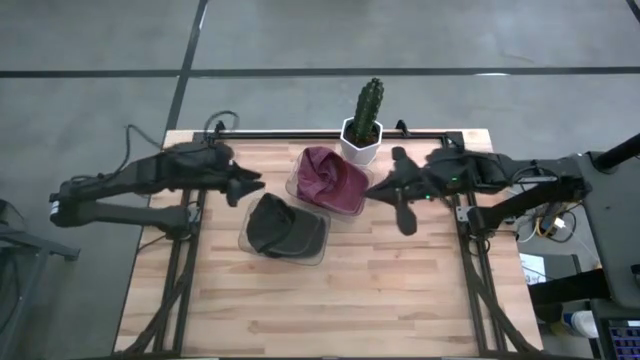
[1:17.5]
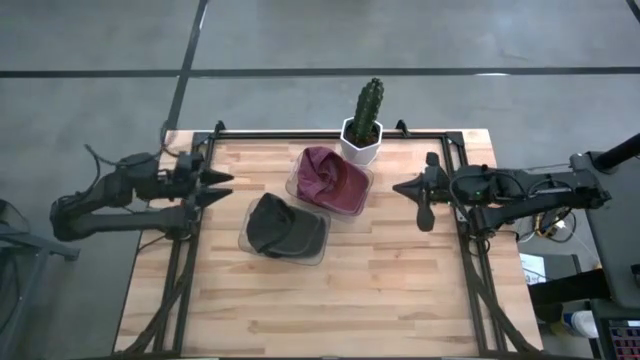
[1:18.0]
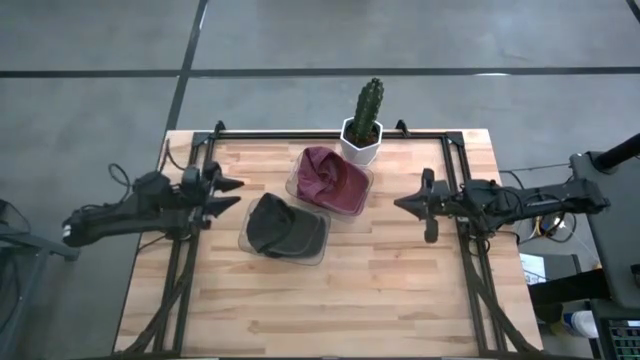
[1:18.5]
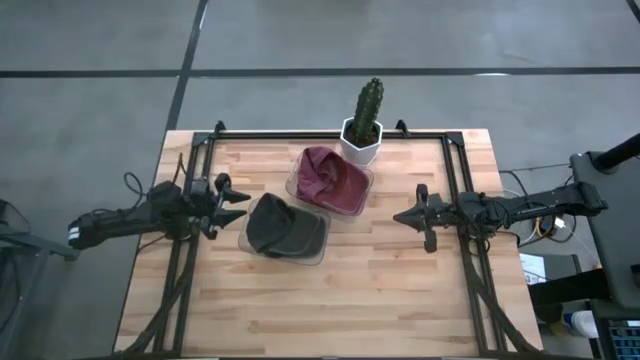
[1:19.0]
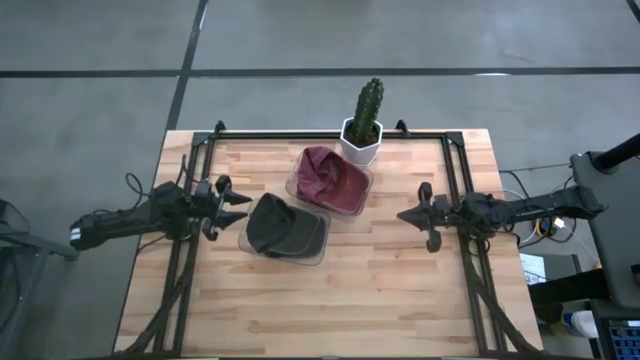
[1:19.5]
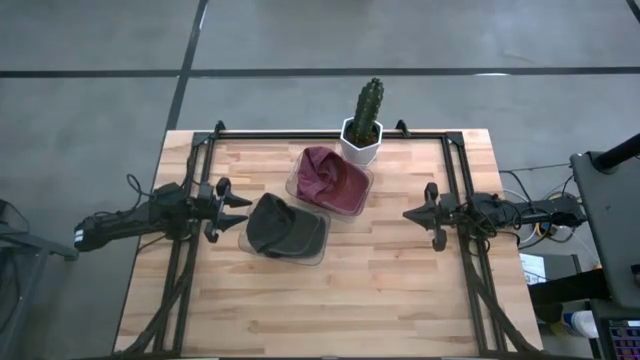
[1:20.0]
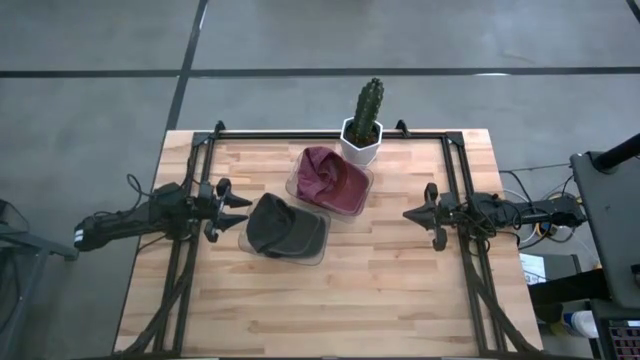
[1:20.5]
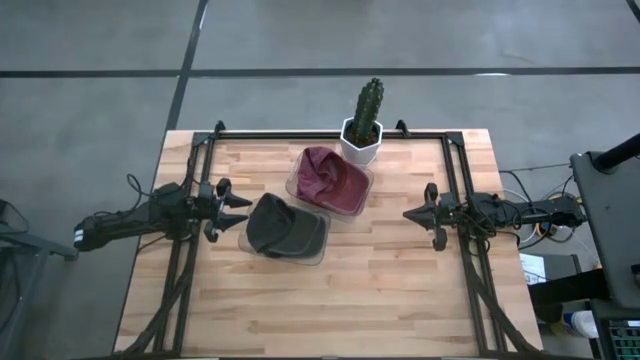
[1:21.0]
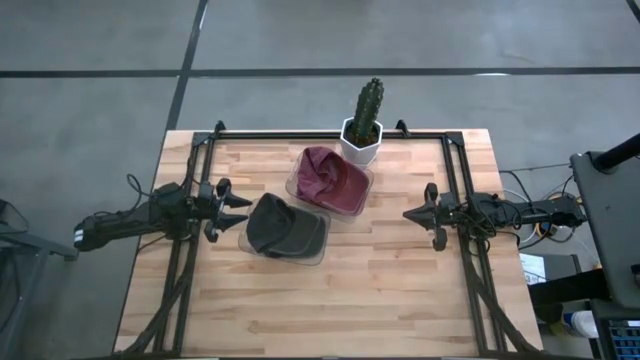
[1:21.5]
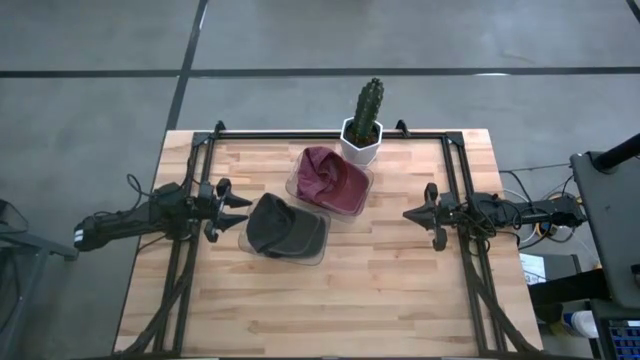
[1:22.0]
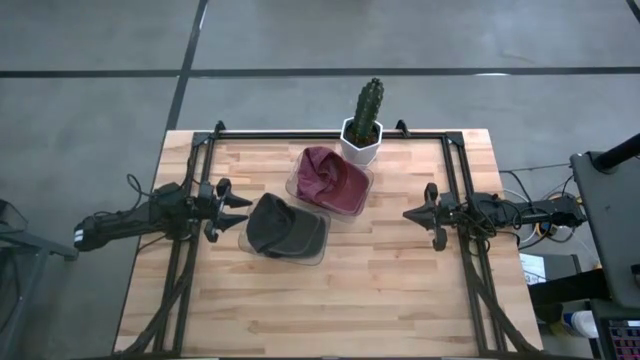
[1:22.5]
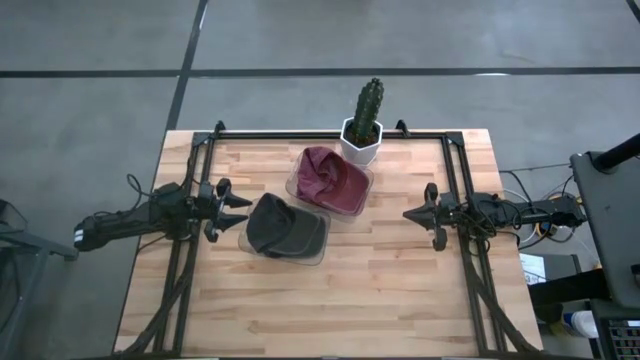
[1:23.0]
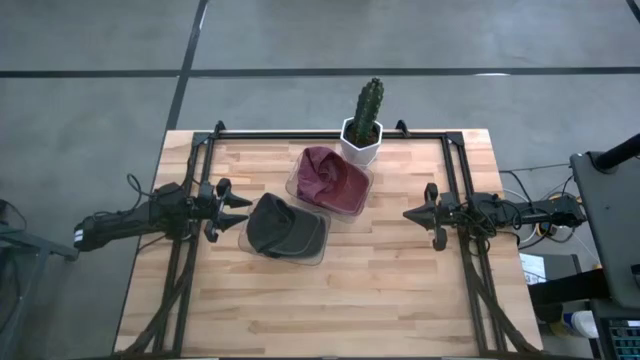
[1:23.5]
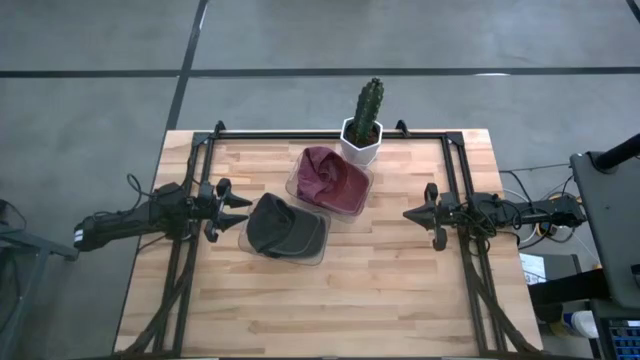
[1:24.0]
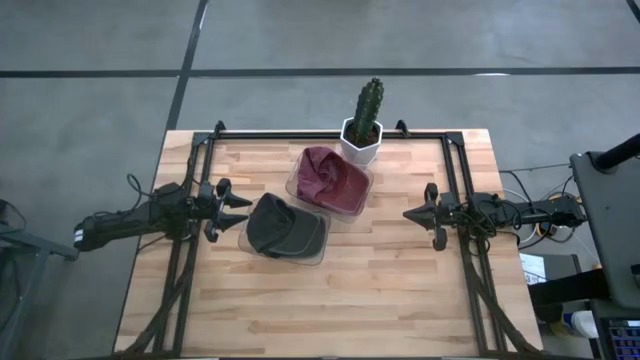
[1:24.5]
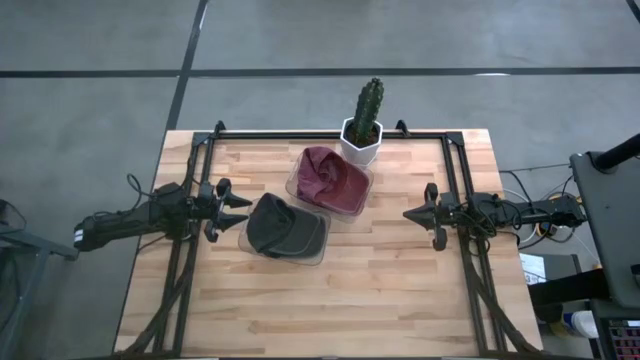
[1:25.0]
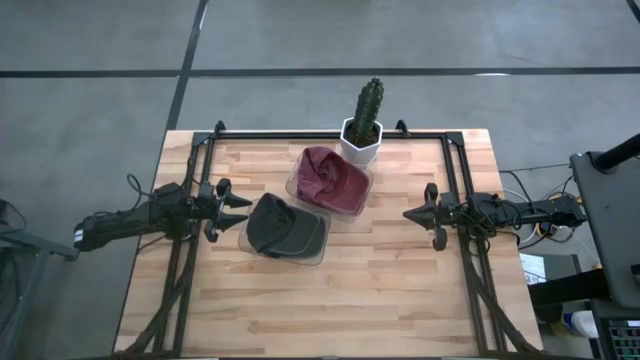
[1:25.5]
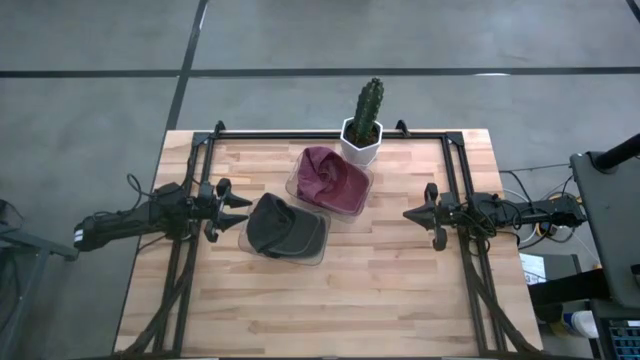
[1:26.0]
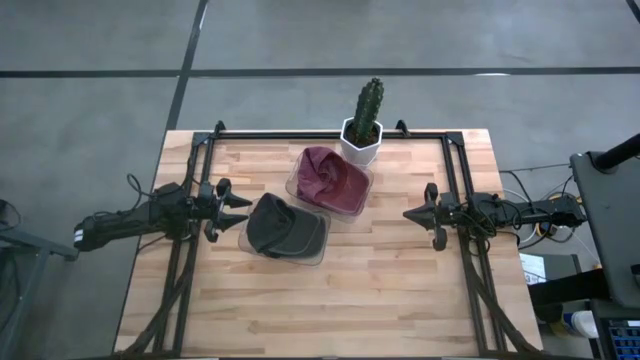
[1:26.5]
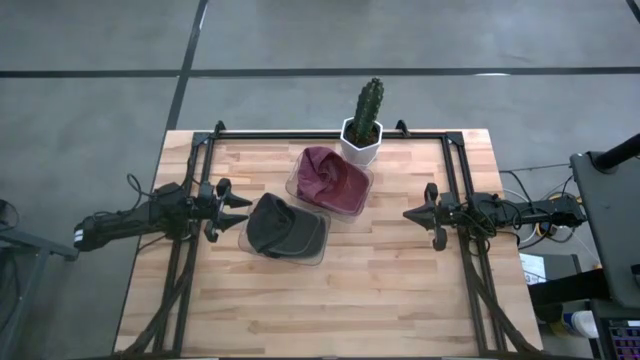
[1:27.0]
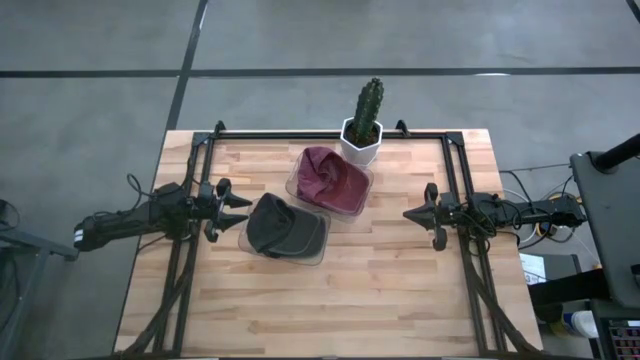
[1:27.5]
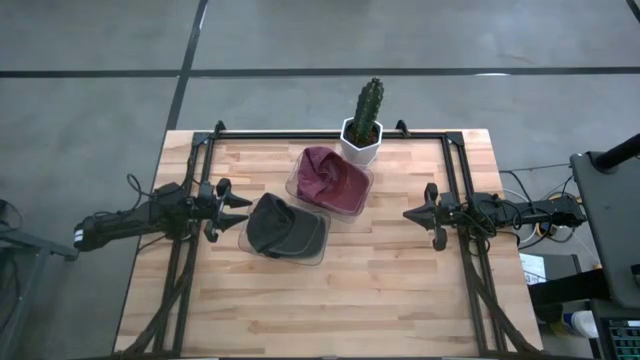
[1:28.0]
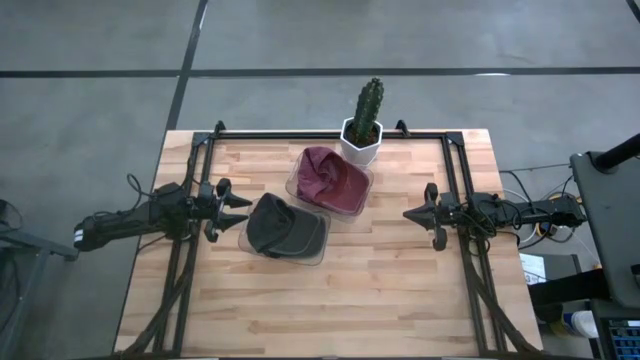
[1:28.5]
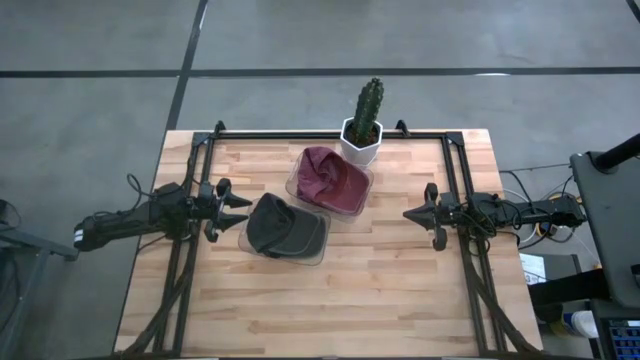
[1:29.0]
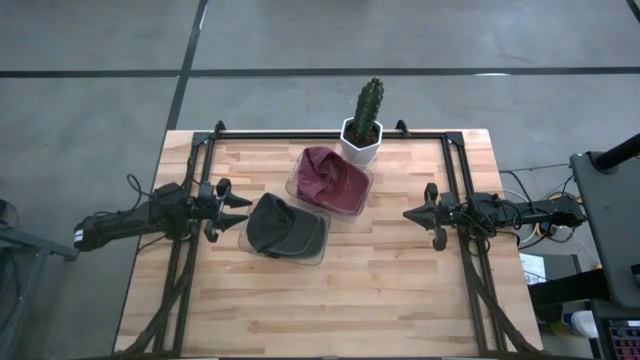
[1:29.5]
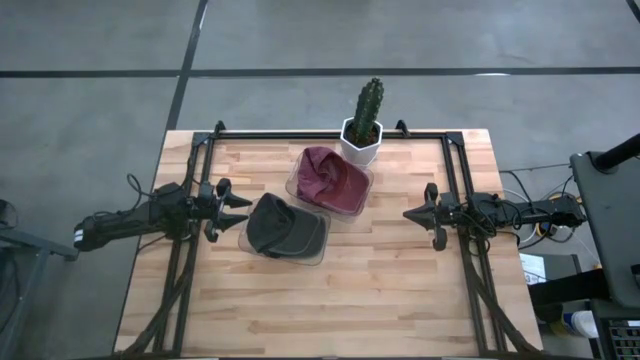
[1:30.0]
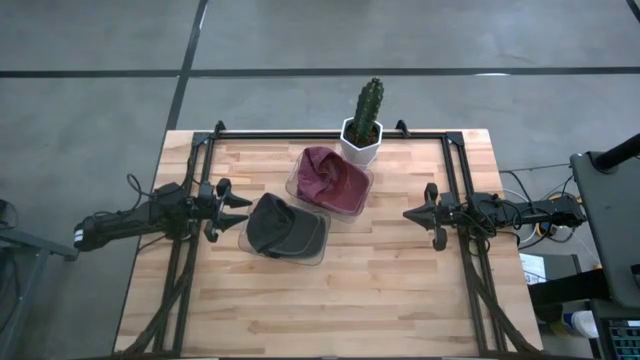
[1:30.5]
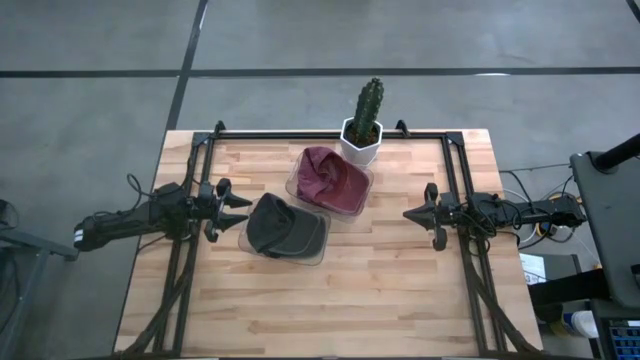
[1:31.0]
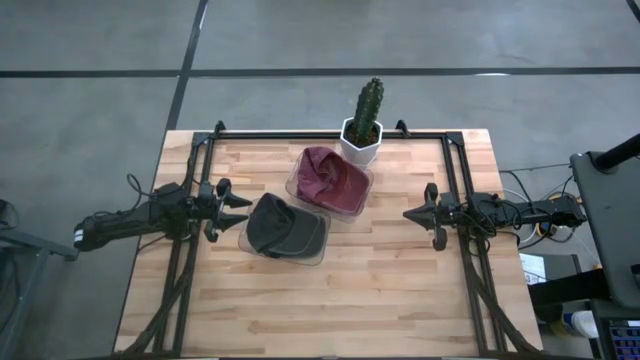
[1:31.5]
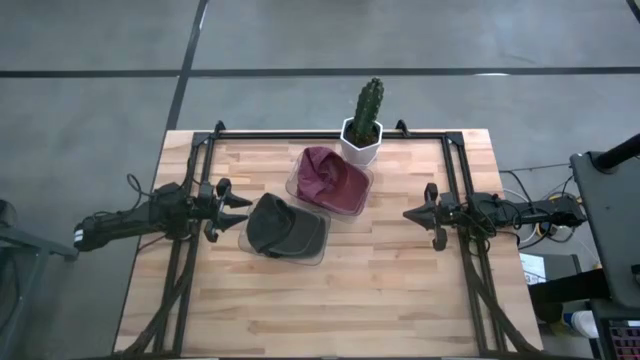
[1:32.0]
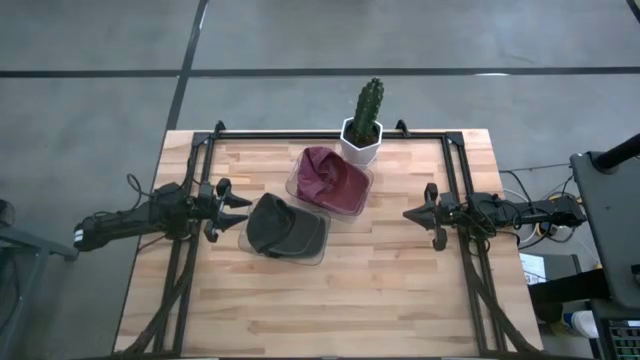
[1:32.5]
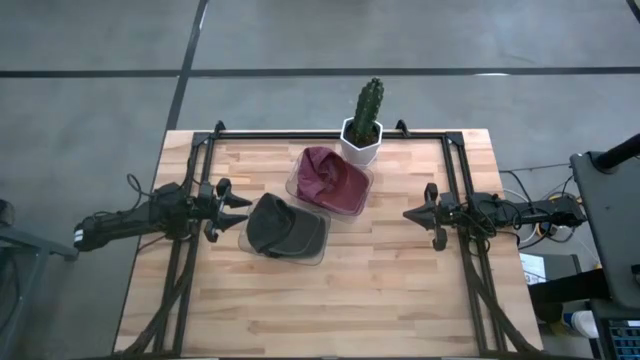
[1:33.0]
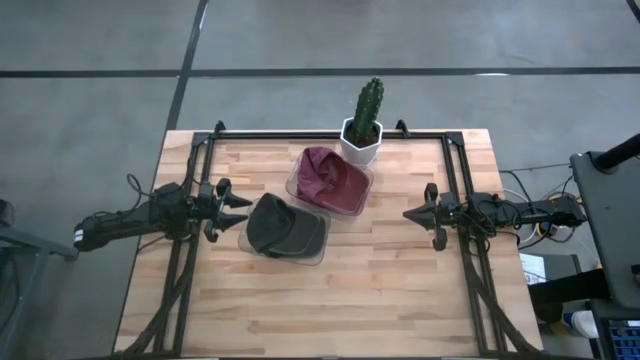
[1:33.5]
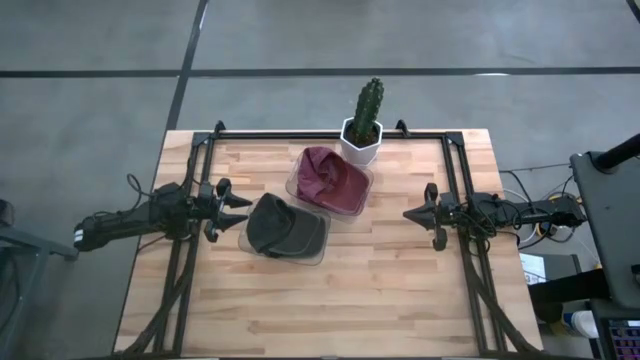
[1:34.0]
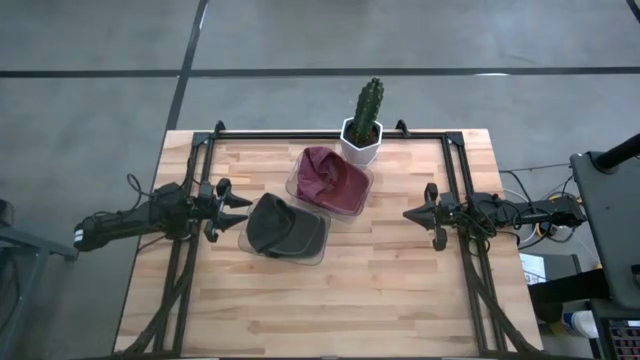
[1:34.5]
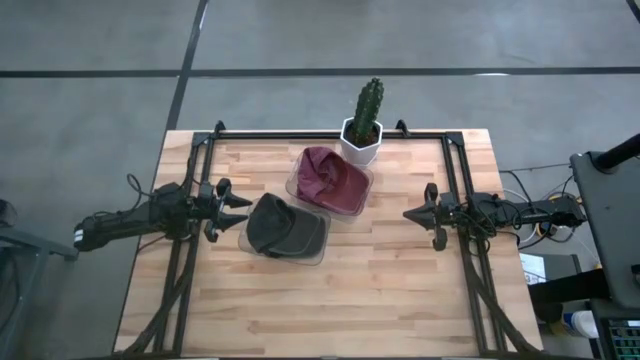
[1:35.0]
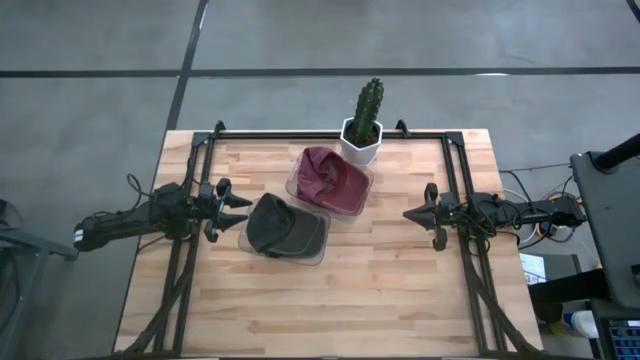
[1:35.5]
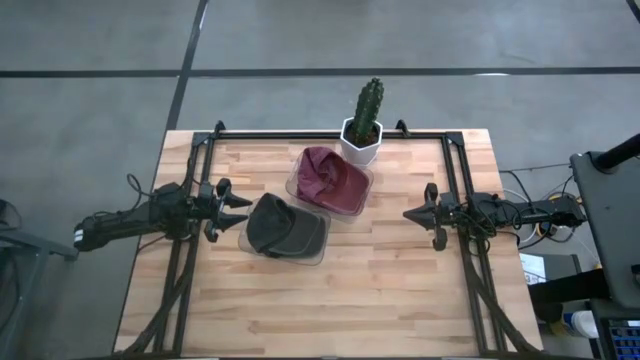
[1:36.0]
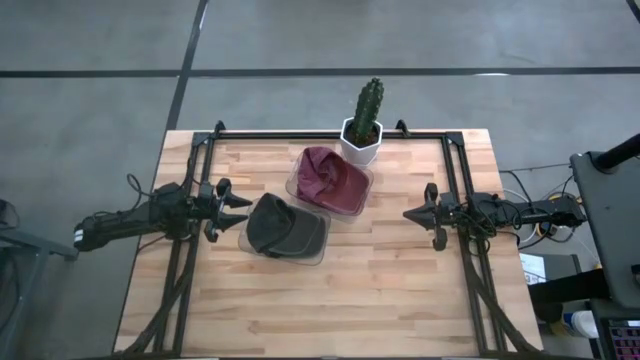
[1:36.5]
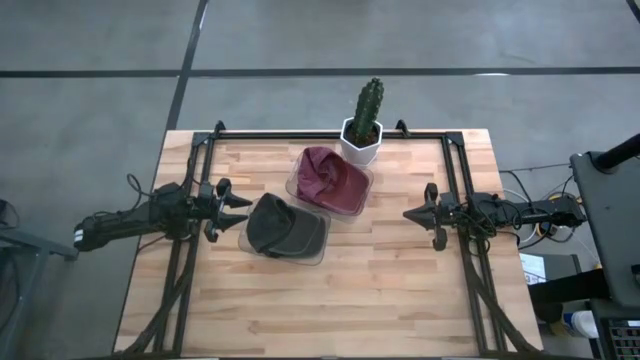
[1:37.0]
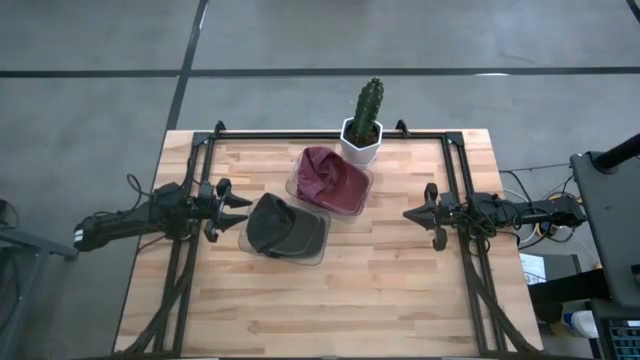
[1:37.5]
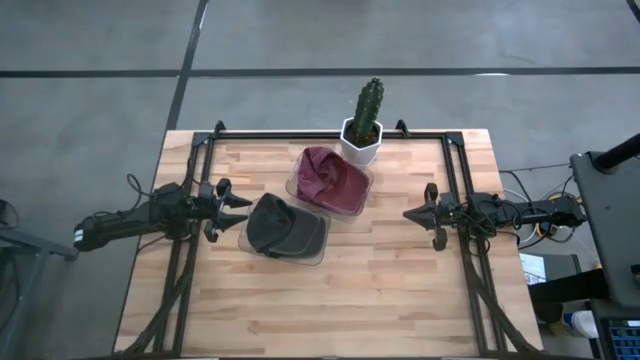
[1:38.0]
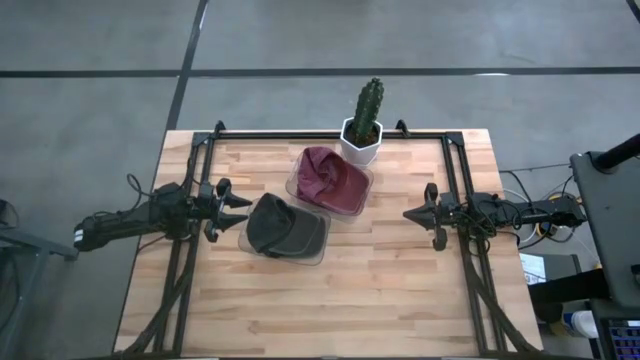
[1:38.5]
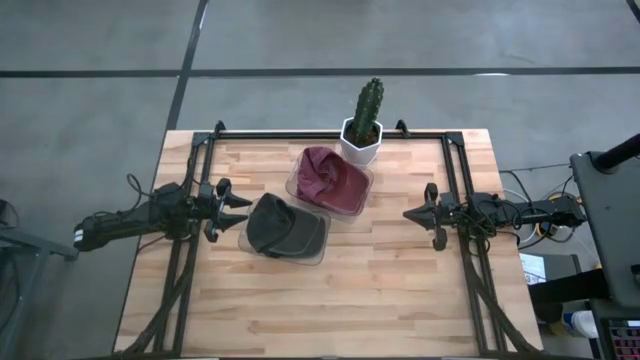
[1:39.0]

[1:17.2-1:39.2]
Task: Pick & Place hat
Return to Home Position
